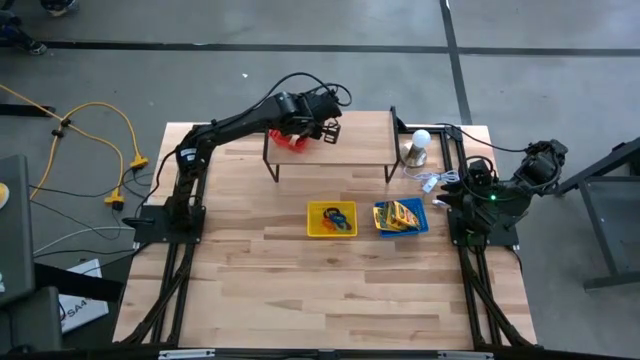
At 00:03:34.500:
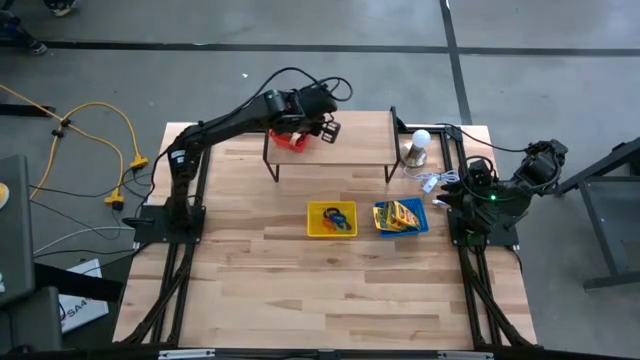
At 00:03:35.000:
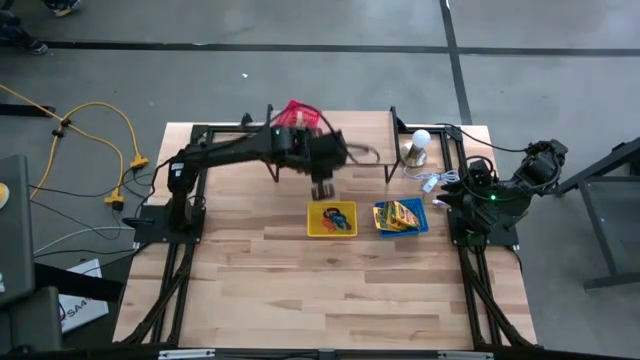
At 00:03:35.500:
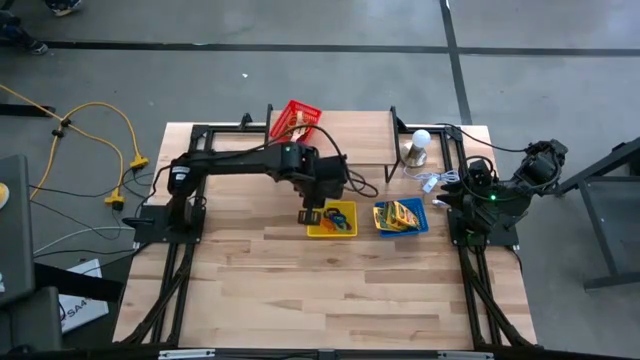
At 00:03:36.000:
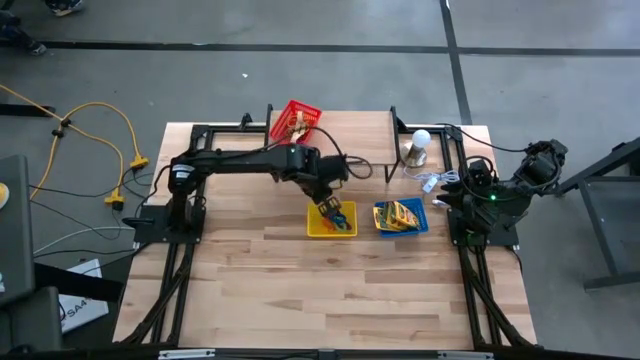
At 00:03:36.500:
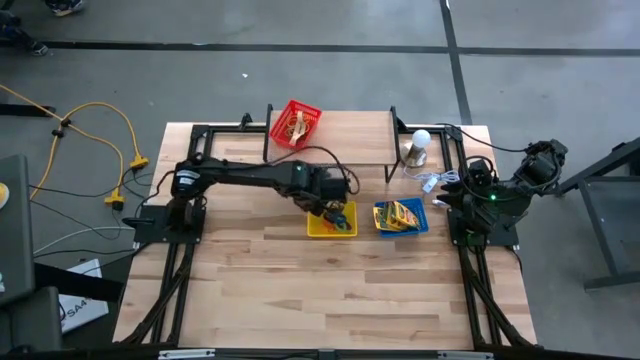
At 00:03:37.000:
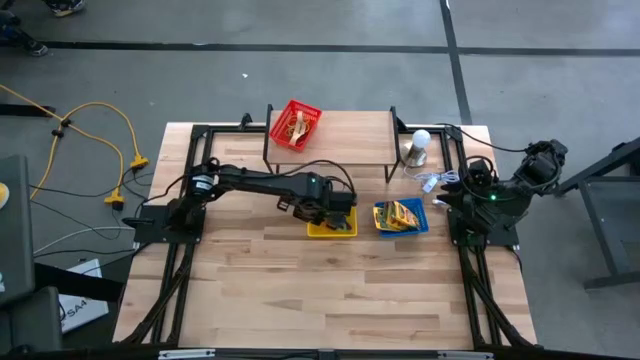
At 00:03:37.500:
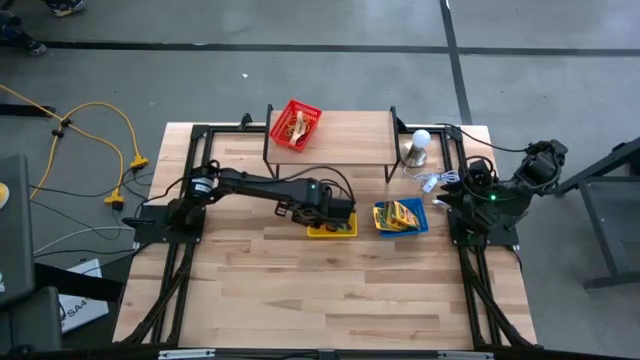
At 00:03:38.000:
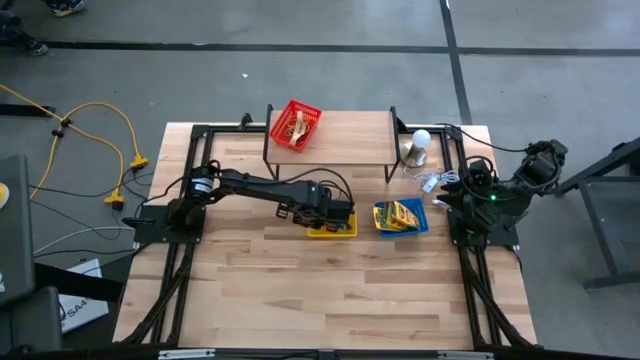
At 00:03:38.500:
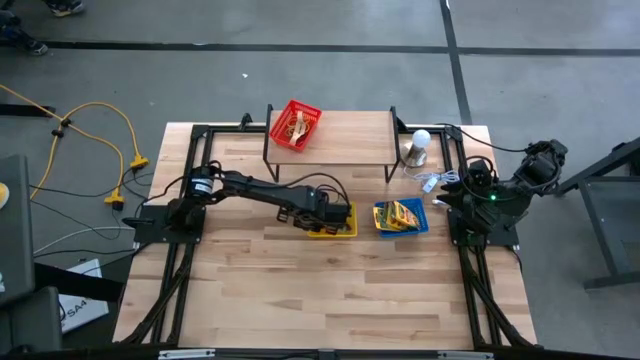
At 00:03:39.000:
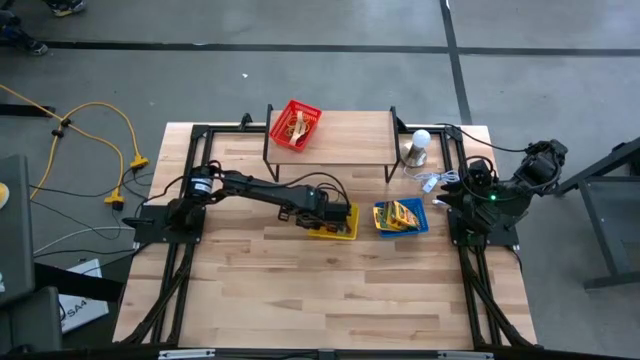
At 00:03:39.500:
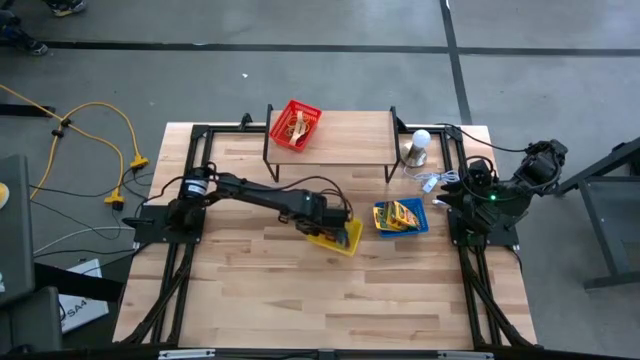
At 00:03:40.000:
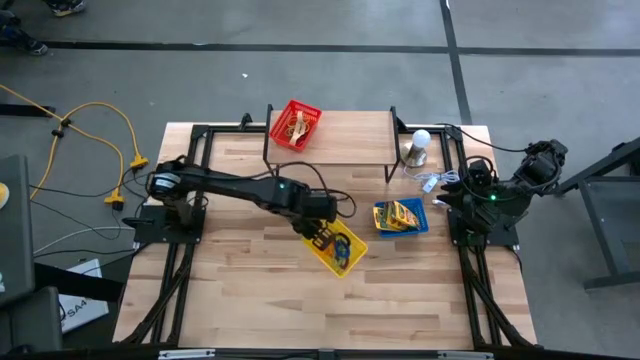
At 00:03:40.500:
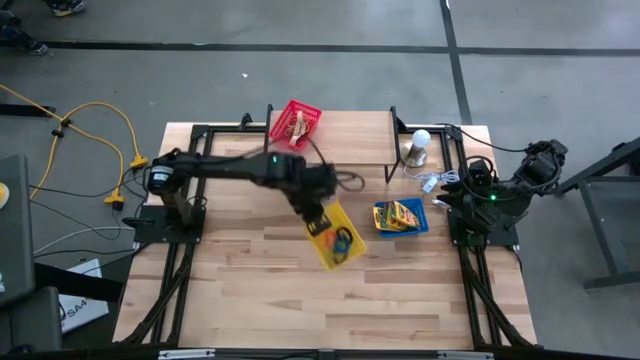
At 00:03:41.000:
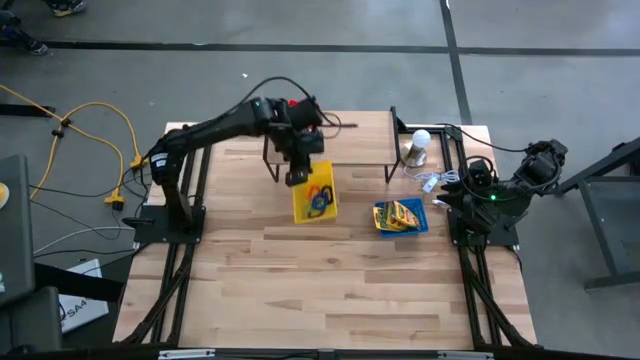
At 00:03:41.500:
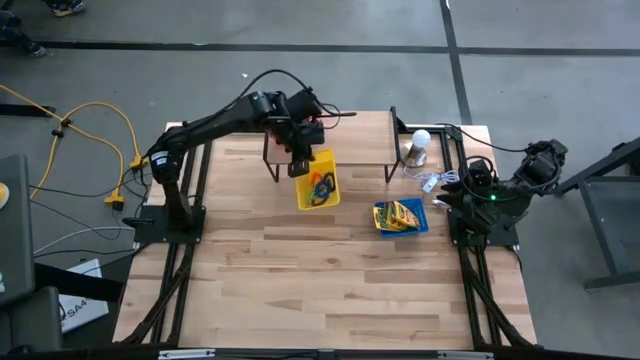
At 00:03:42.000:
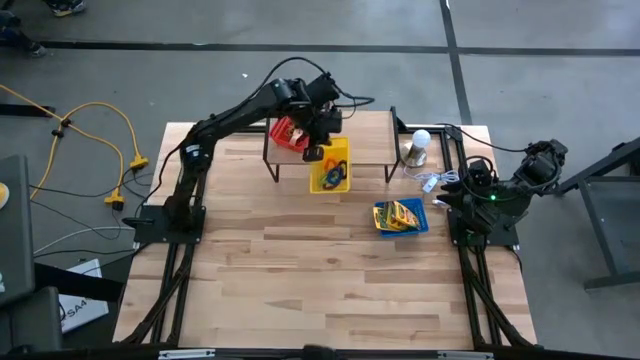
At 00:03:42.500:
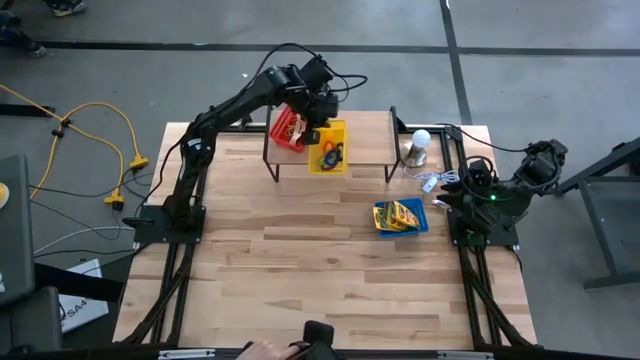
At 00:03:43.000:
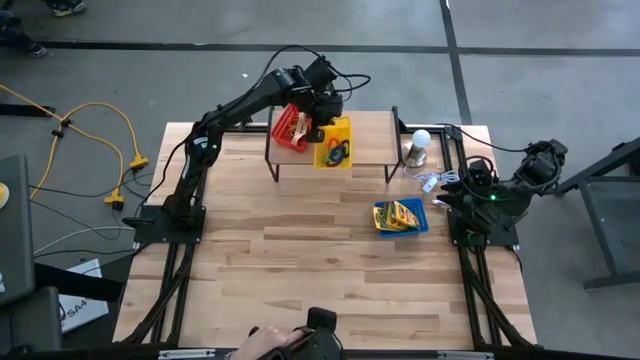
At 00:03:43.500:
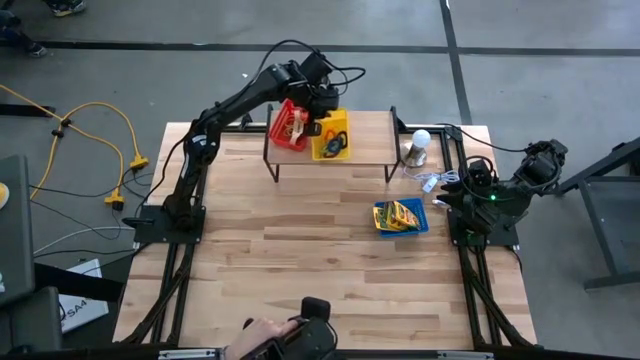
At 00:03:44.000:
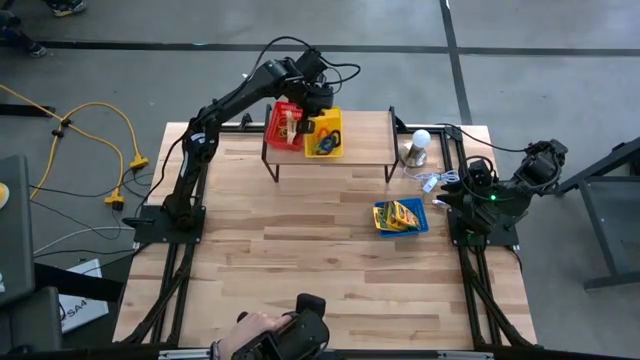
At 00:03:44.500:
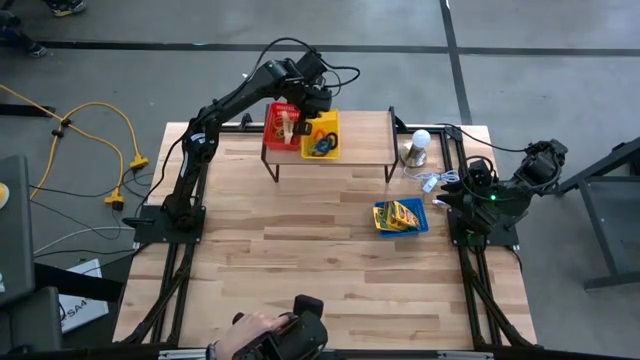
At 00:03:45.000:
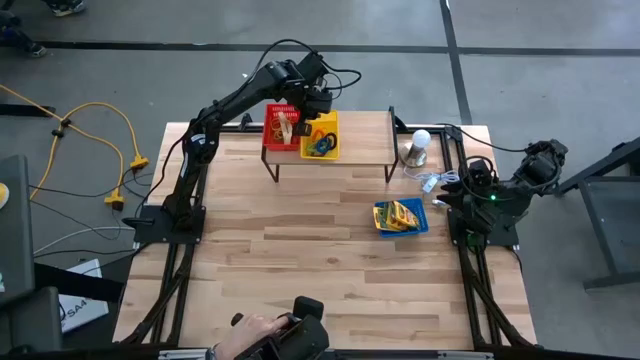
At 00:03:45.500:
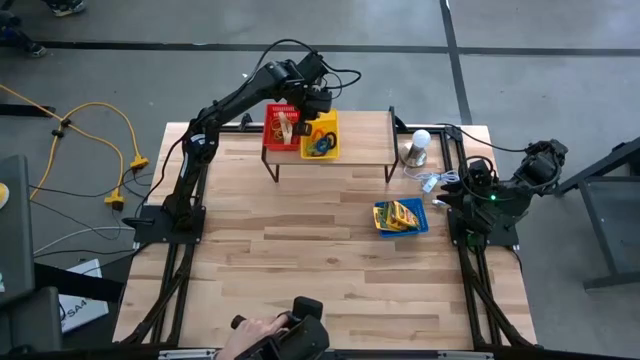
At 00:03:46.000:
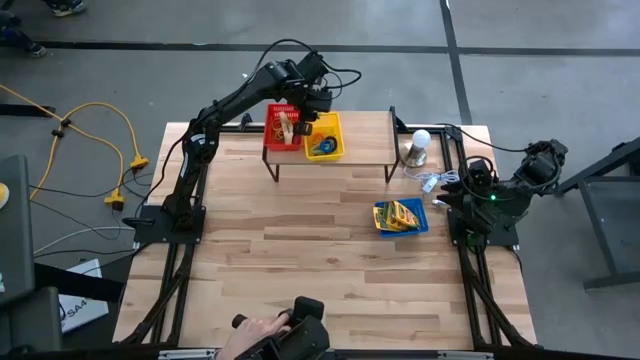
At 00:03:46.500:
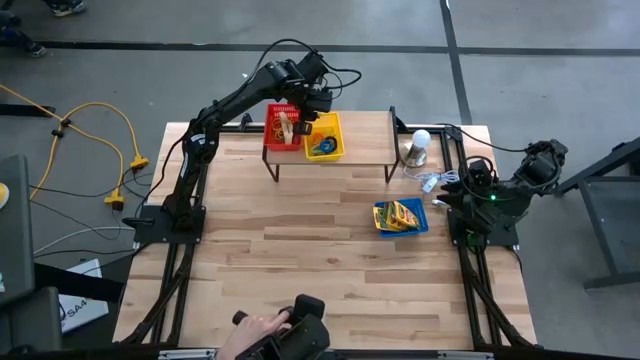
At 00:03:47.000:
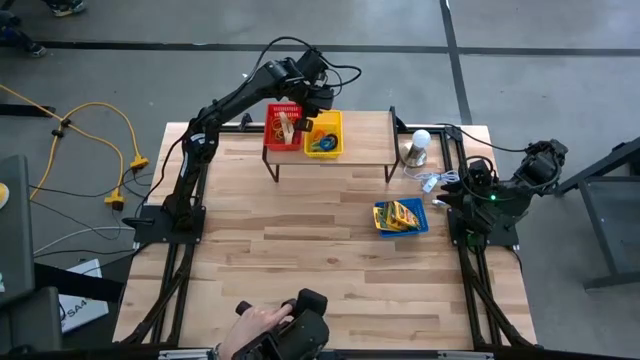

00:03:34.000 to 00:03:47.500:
Task: Pick & Place Office Desk Supplies
Put the yellow bin on the shelf

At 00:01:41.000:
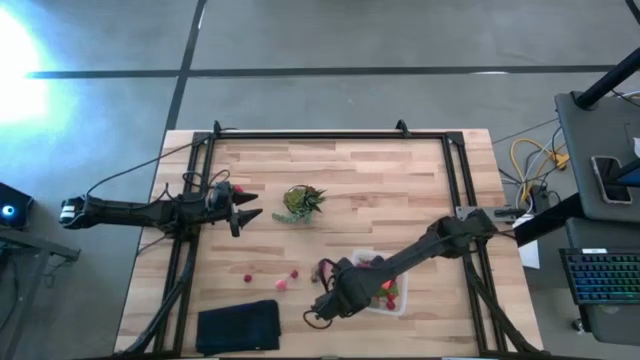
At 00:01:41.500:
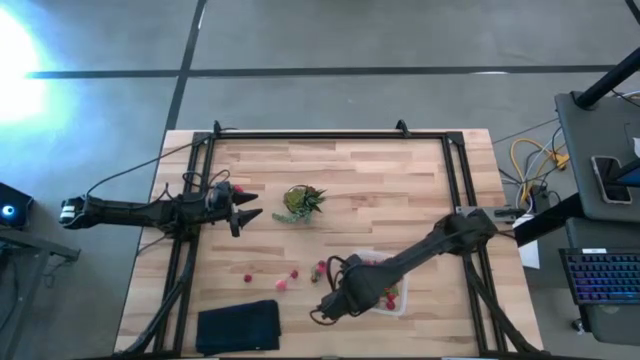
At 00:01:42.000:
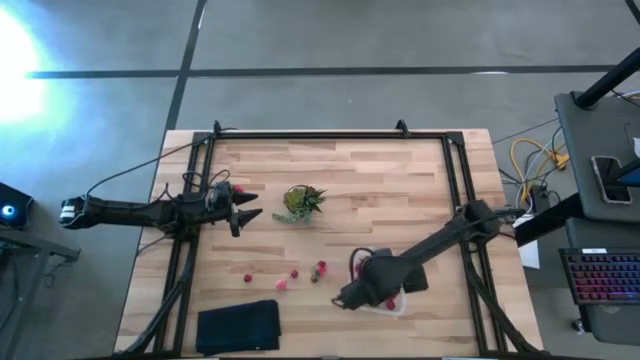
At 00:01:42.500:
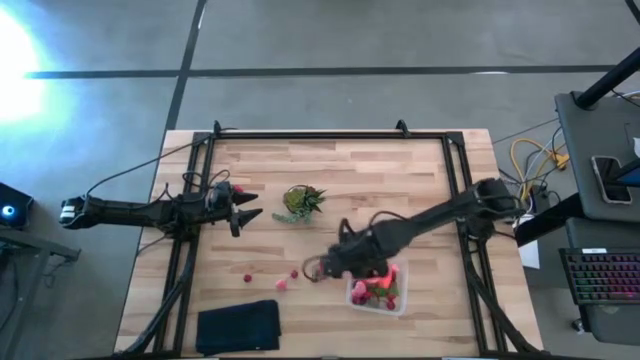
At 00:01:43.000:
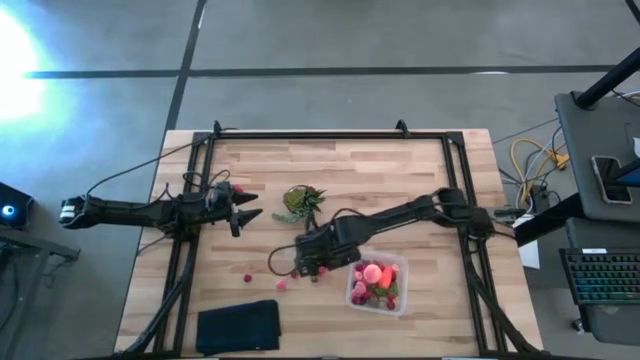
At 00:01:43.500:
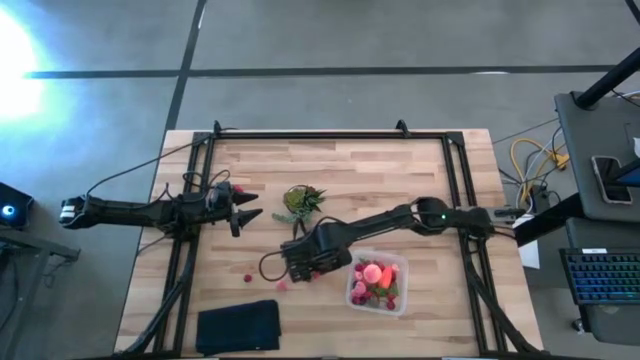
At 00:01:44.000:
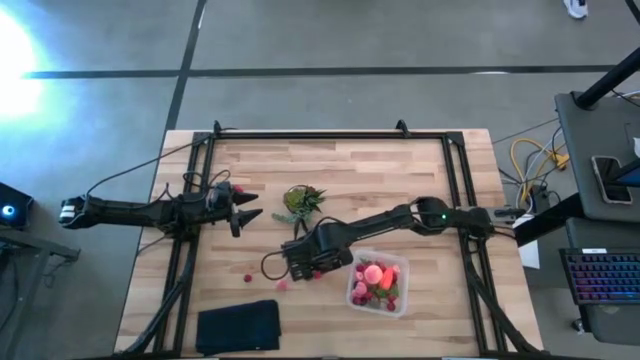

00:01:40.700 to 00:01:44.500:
Task: Pick and placing Produce into tupperware
Put the bottom strawberry into the bin

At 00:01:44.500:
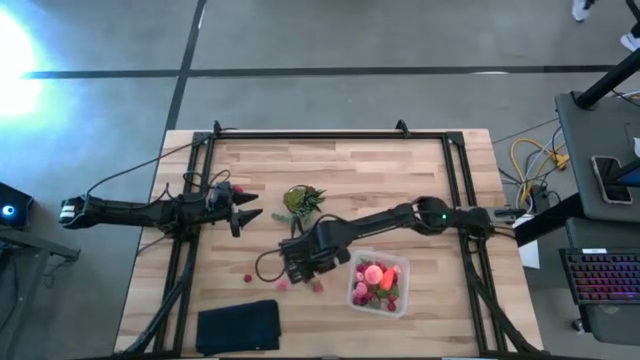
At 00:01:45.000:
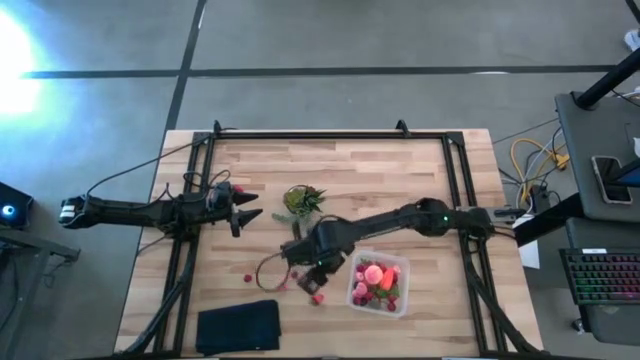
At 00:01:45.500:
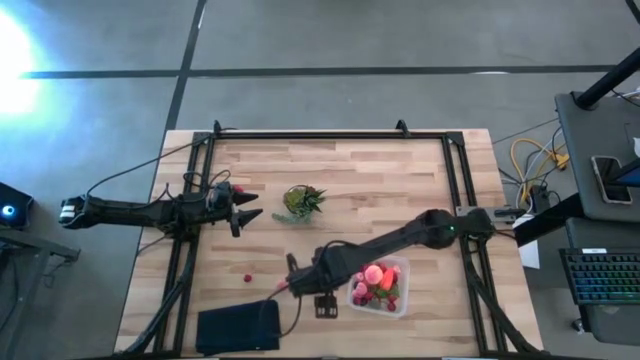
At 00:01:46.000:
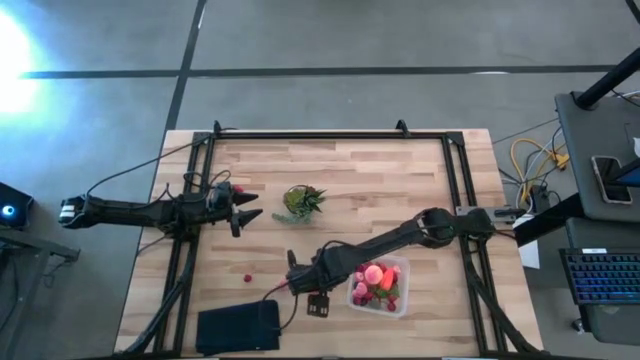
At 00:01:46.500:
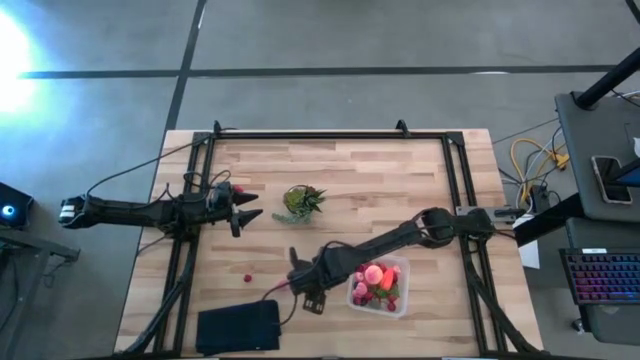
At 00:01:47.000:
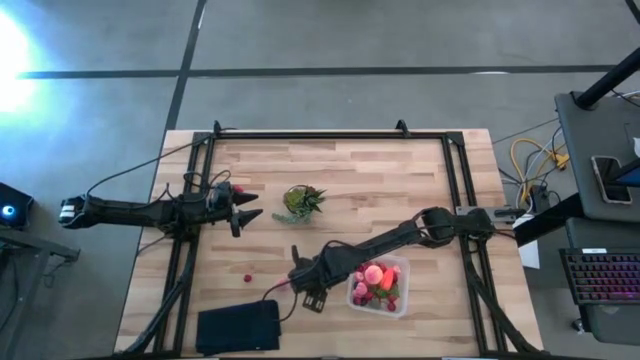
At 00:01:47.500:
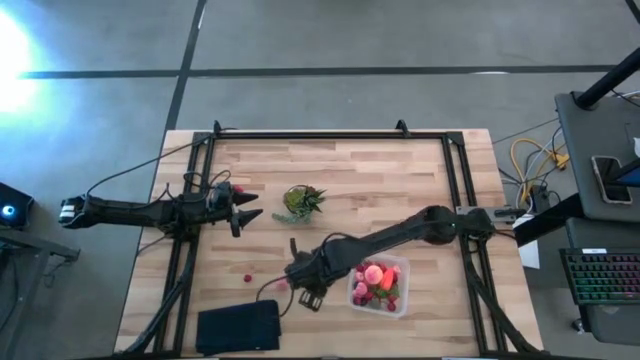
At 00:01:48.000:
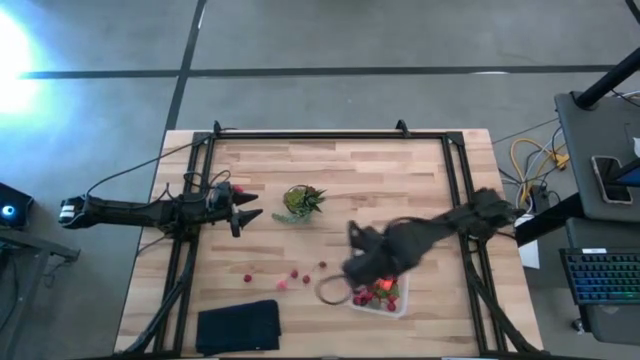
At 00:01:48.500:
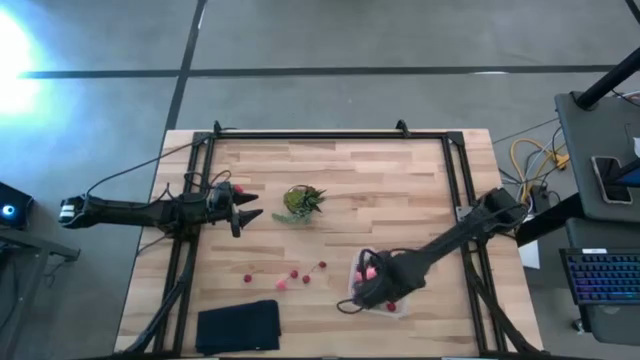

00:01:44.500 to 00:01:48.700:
Put the bottom strawberry into the bin
